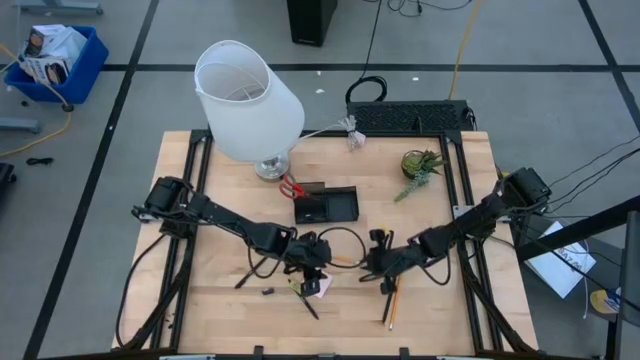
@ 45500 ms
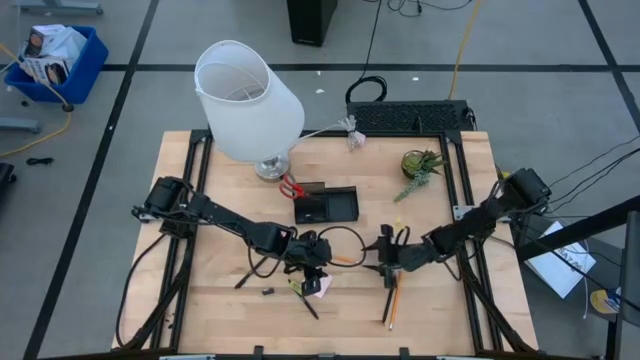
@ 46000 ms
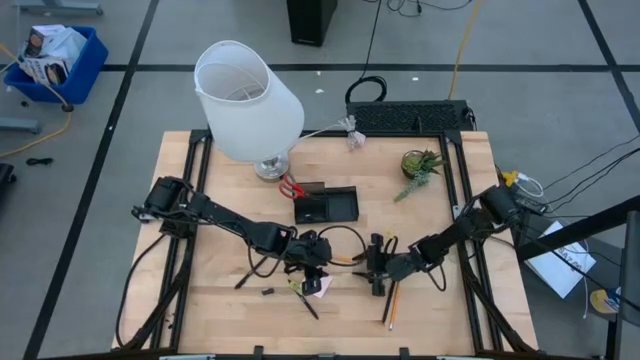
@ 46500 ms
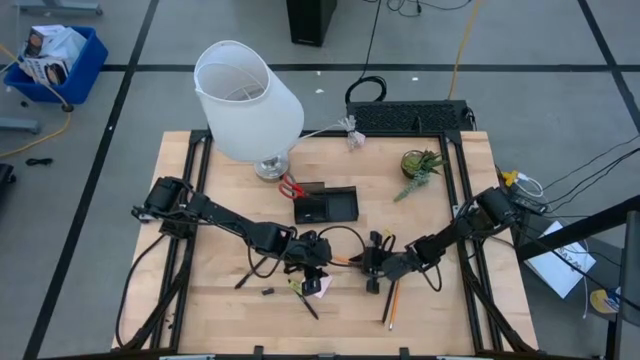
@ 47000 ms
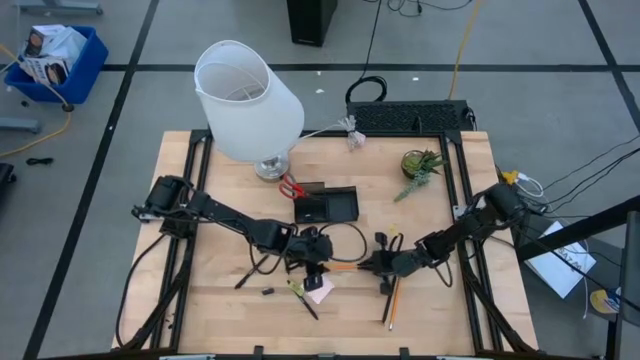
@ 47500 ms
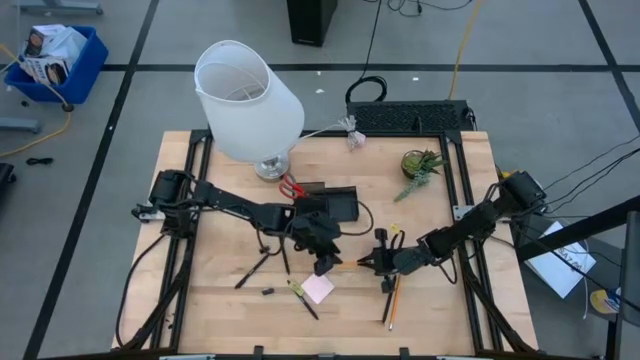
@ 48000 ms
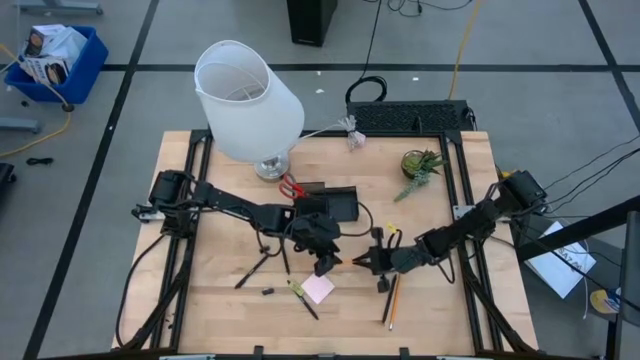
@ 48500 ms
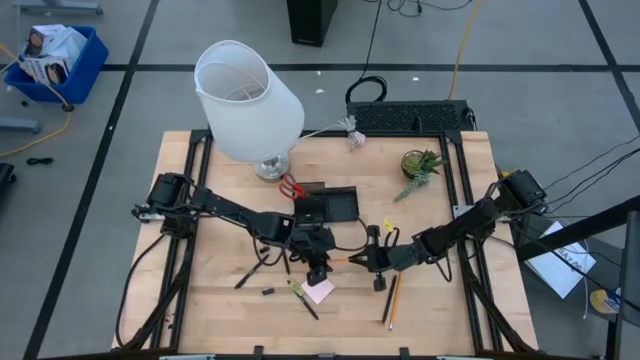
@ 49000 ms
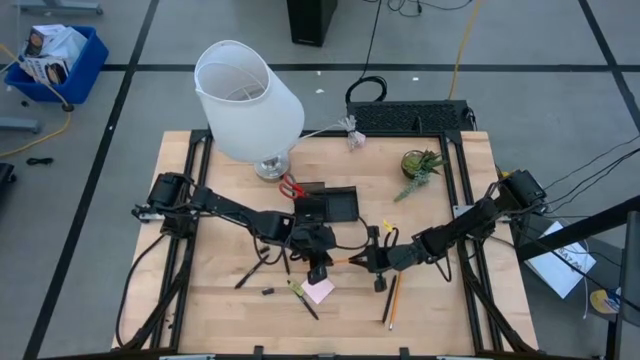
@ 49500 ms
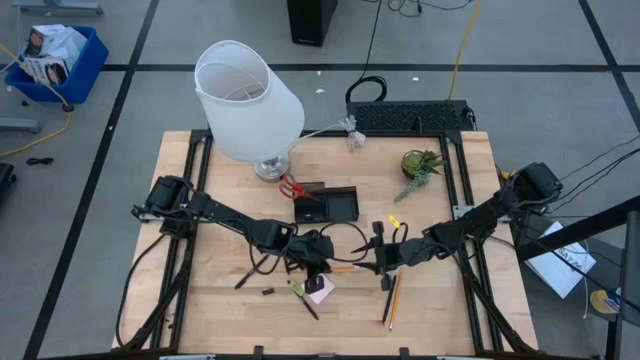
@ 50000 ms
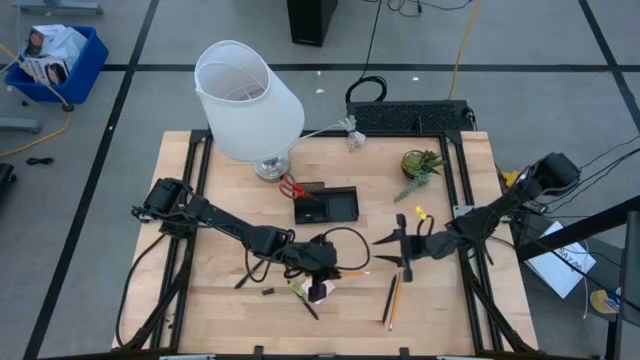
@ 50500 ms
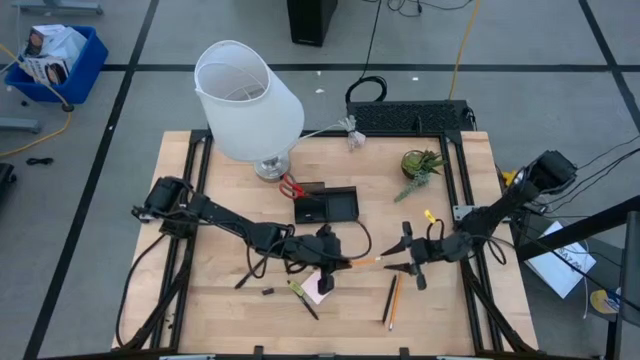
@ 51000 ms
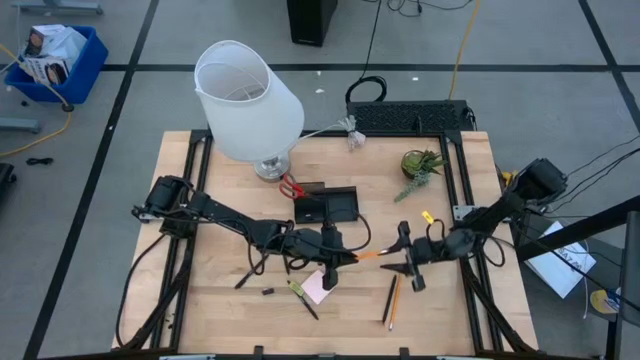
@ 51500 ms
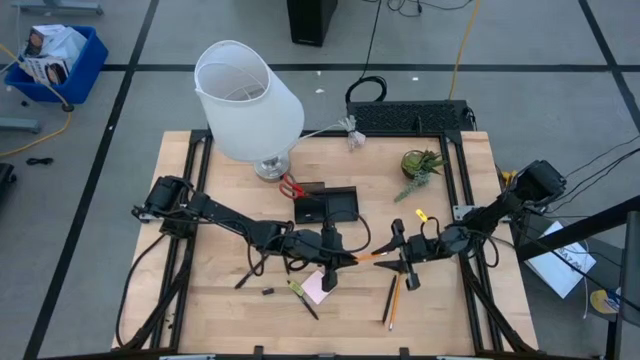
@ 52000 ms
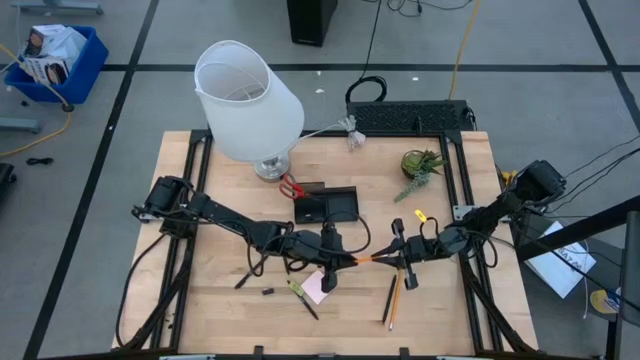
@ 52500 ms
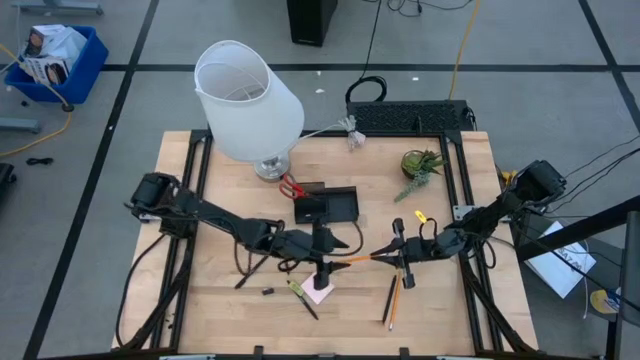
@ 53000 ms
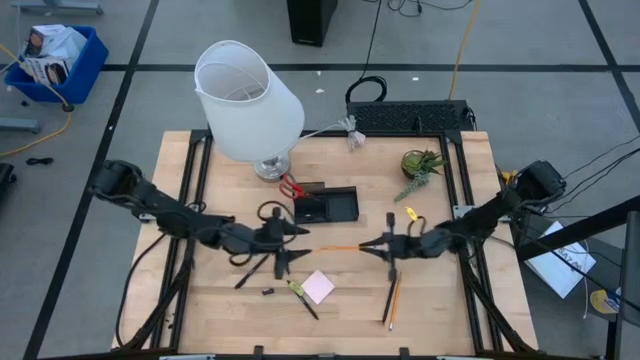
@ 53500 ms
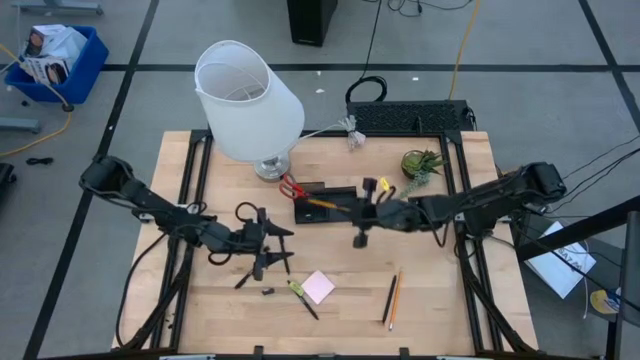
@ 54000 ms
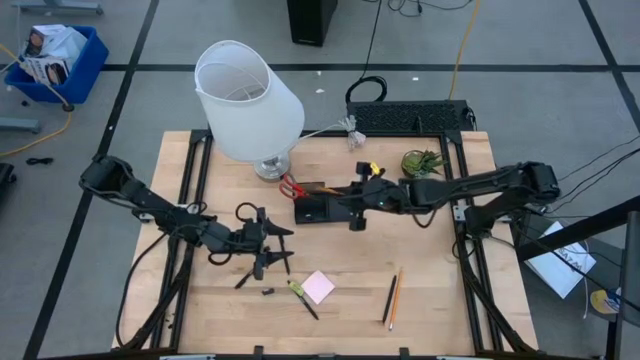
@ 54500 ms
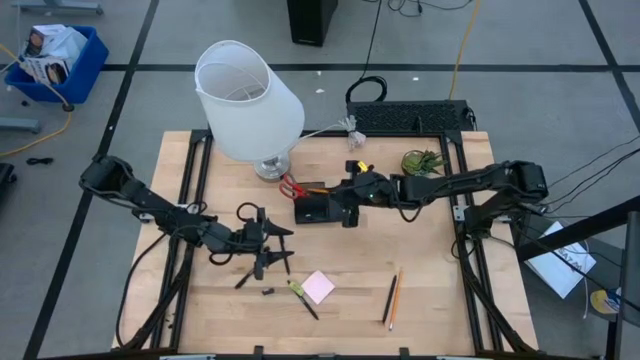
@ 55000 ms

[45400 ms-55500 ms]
Task: Pick and place office supplies into organizer
Put the left yellow pencil into the top left compartment of the desk organizer

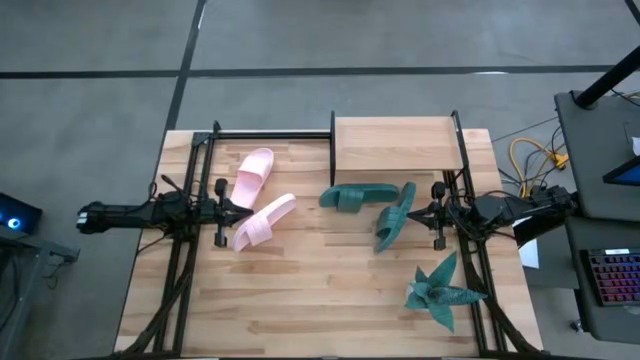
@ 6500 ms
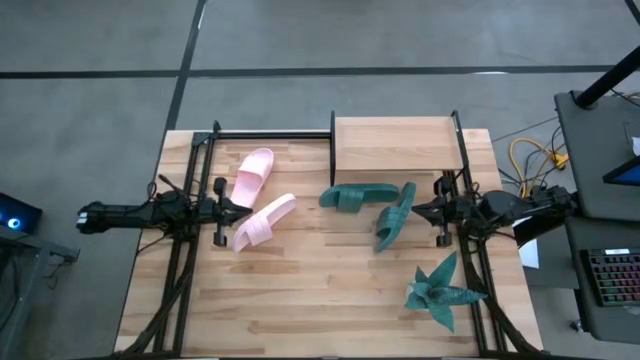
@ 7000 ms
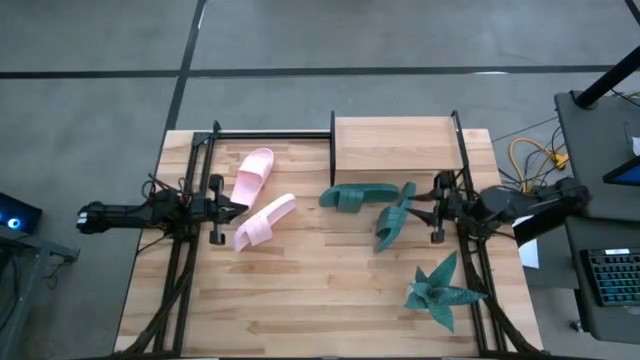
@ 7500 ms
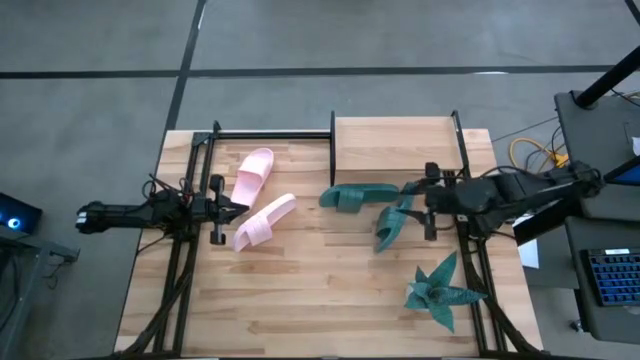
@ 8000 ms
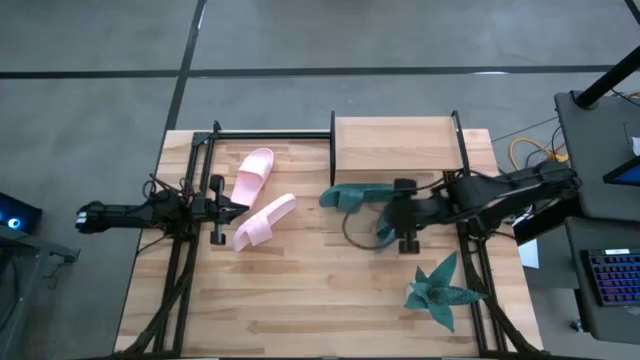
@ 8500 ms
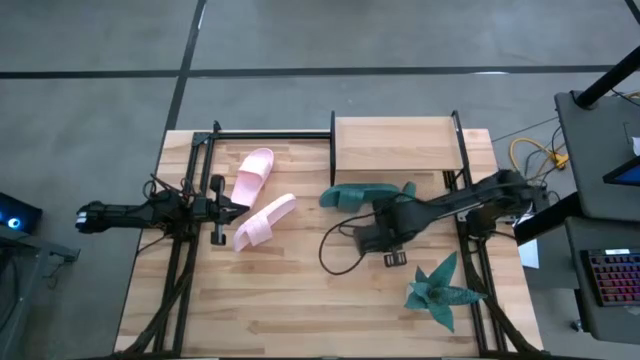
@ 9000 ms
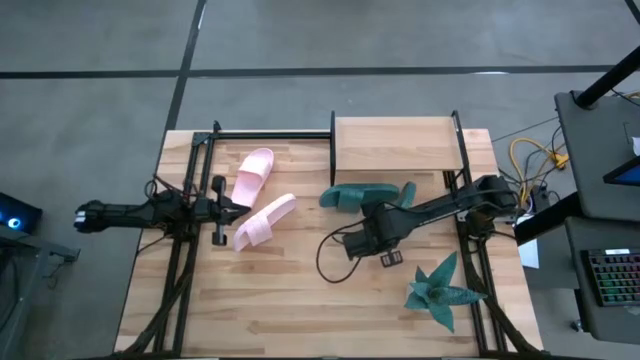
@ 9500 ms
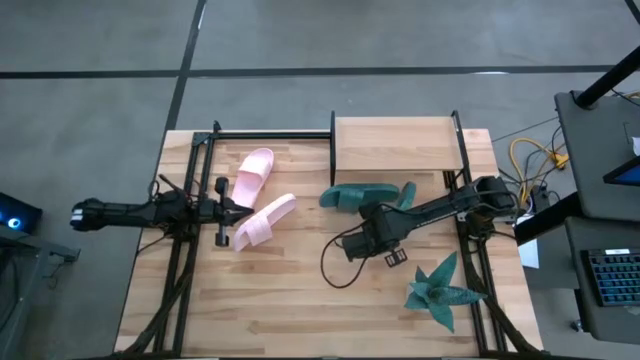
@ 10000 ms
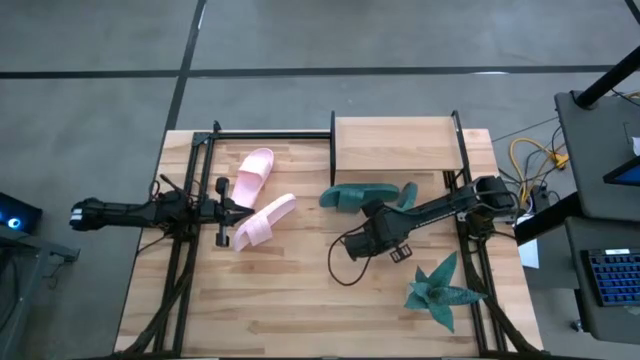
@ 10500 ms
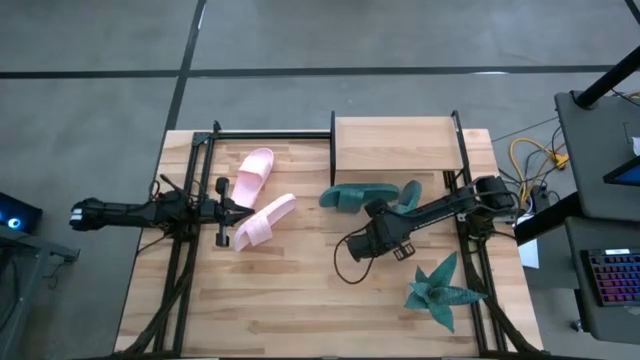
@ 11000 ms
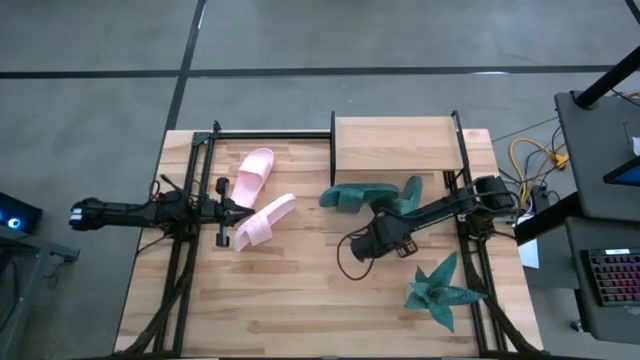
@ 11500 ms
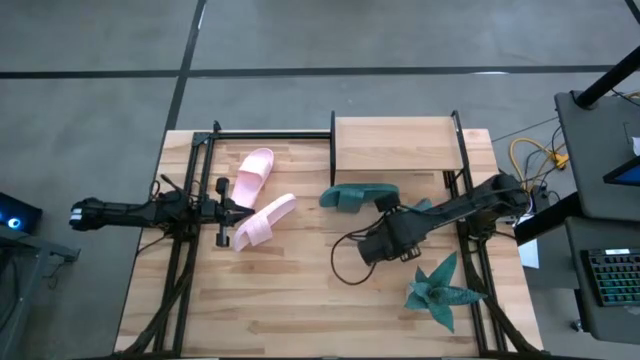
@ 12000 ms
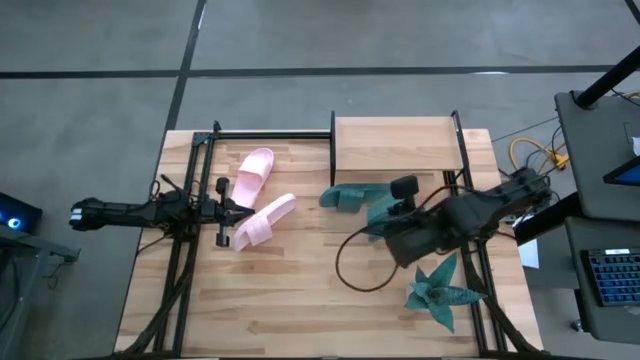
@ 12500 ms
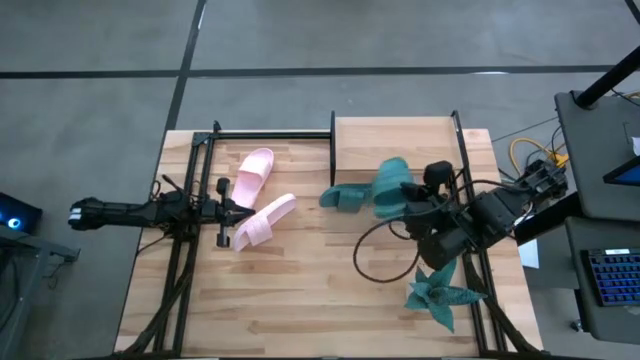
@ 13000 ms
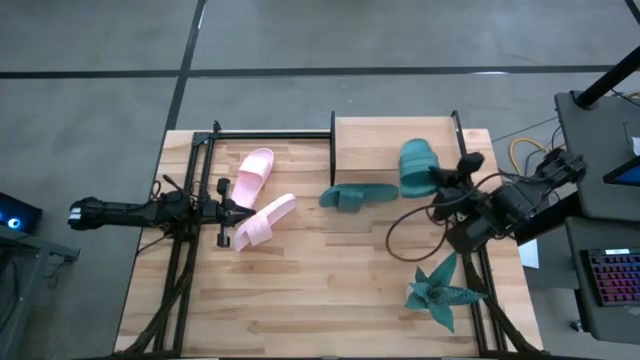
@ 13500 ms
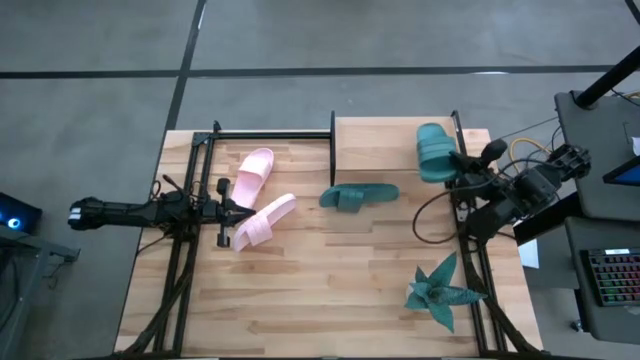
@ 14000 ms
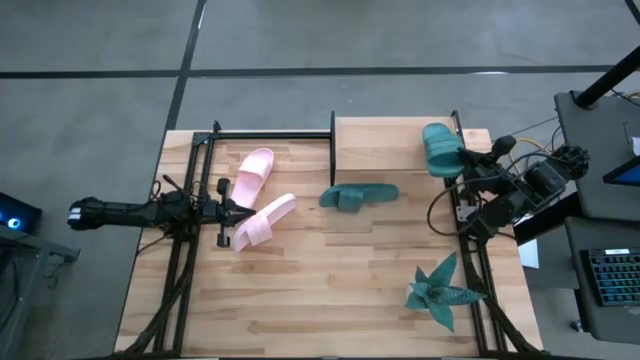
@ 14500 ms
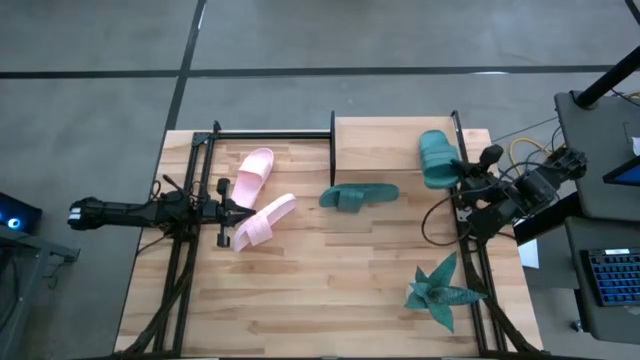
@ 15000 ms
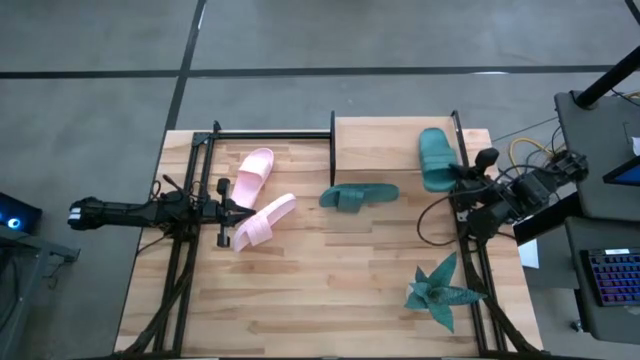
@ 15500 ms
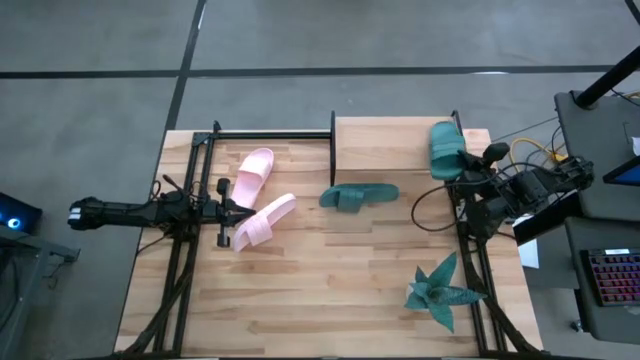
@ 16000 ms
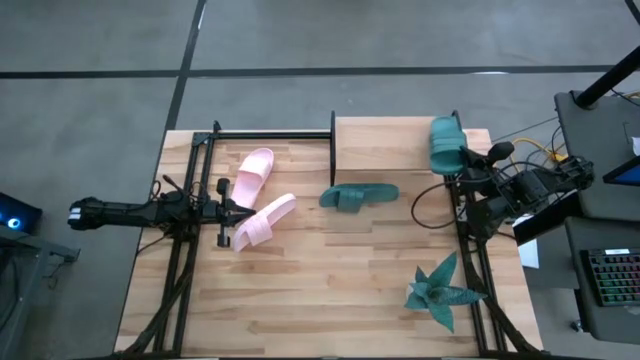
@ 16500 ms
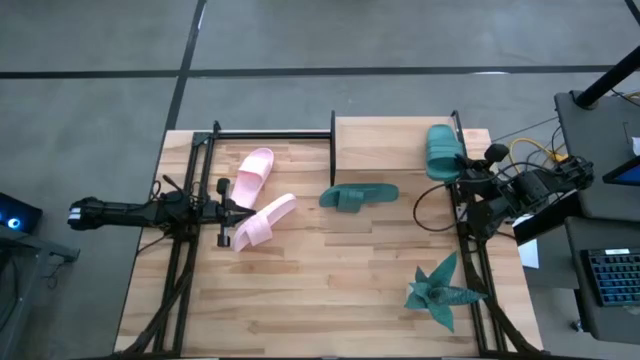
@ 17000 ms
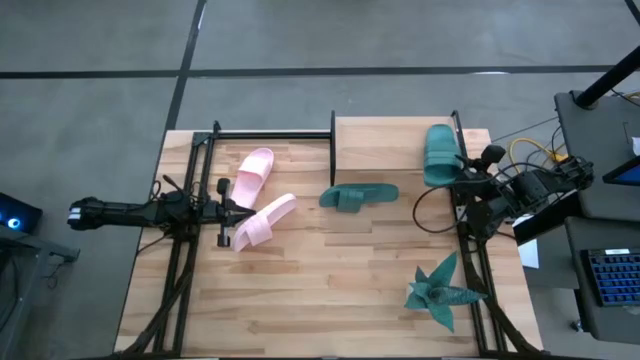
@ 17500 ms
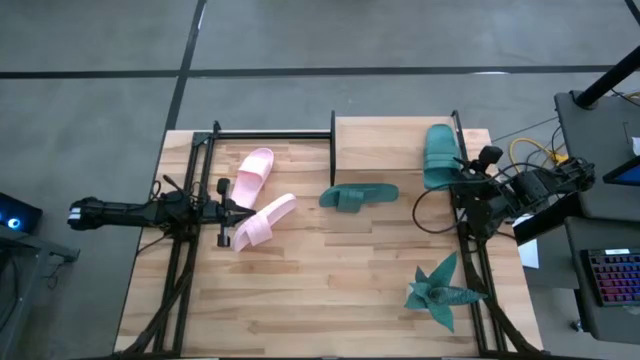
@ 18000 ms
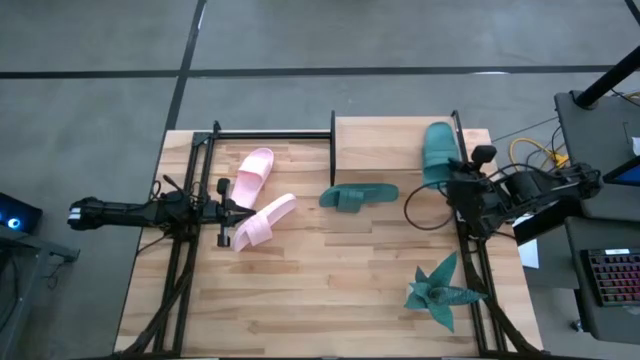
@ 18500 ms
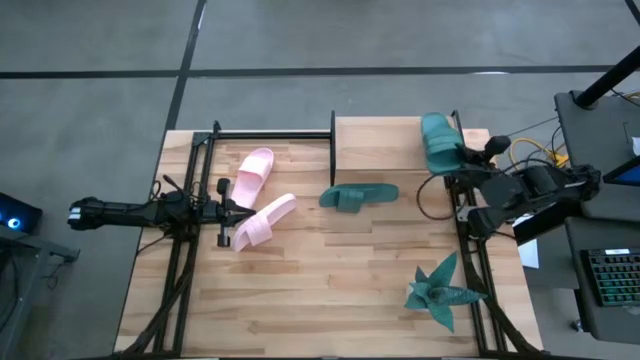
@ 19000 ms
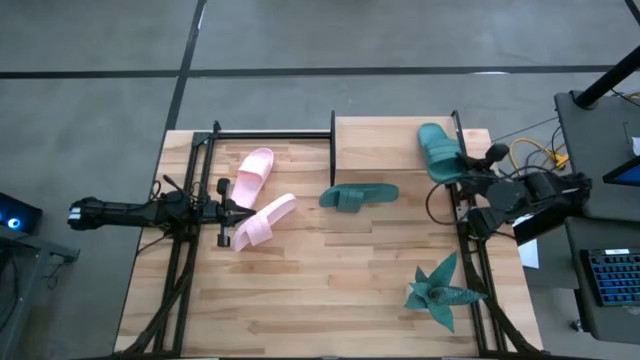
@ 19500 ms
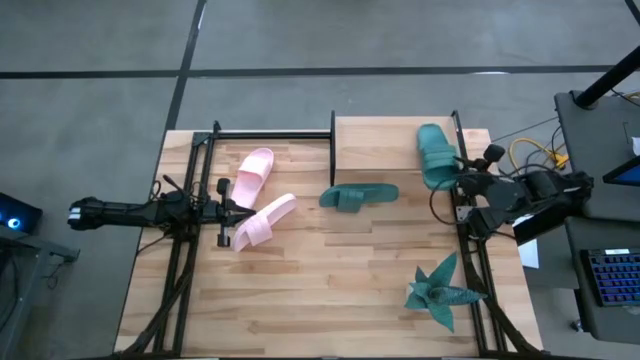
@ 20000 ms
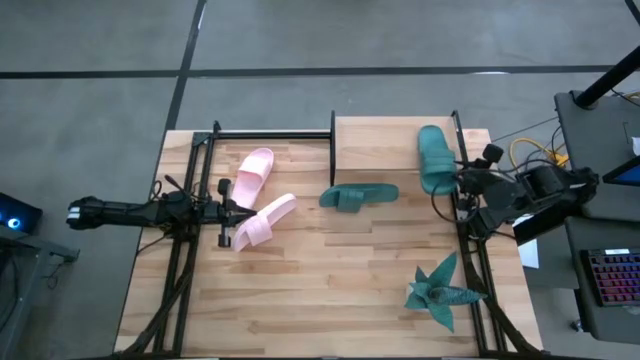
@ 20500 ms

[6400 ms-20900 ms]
Task: Pick and place slides into the shelf
Put the right green slide on the shelf
